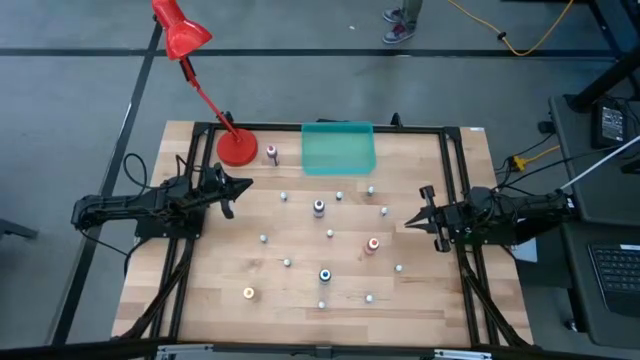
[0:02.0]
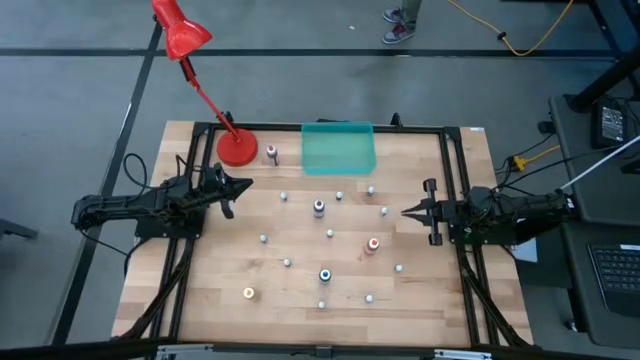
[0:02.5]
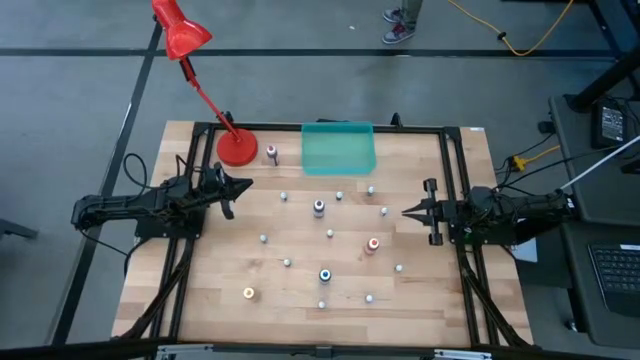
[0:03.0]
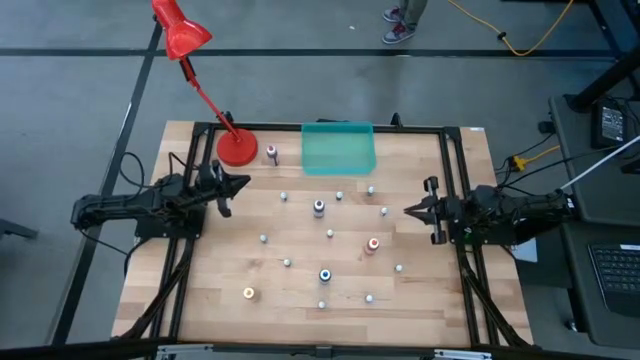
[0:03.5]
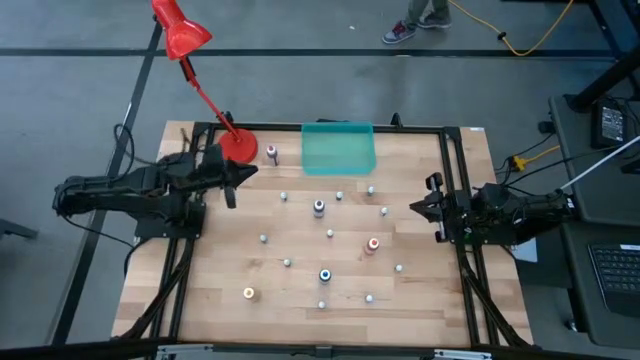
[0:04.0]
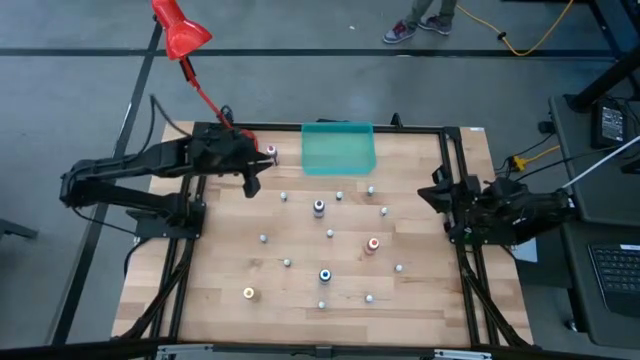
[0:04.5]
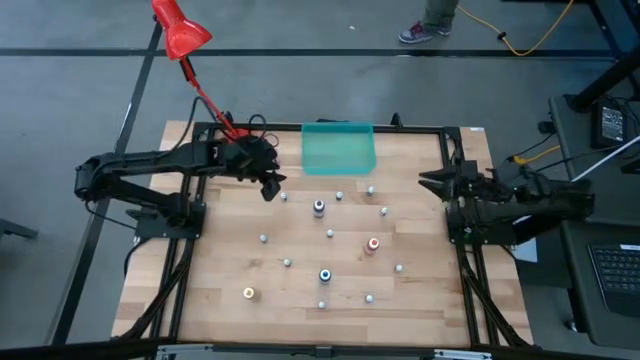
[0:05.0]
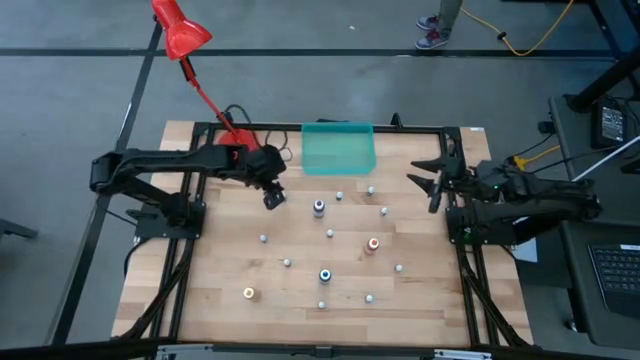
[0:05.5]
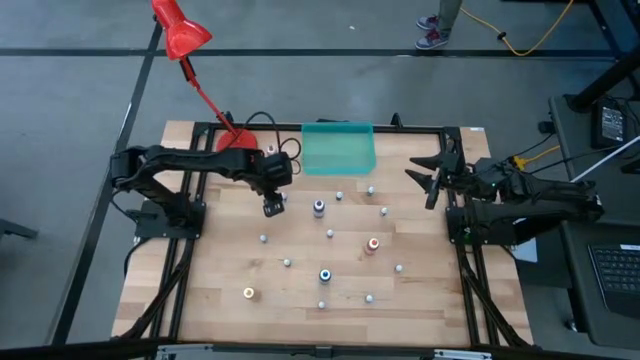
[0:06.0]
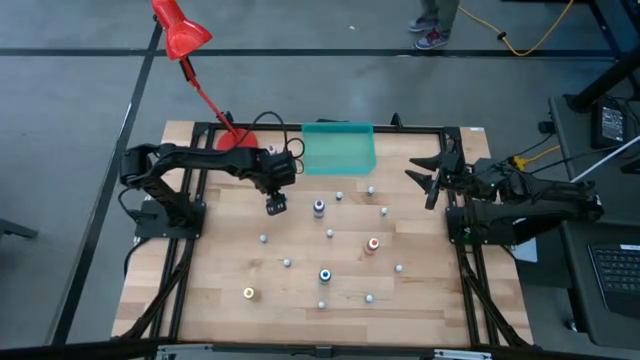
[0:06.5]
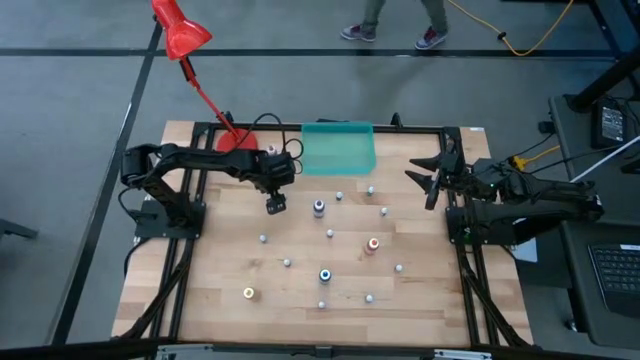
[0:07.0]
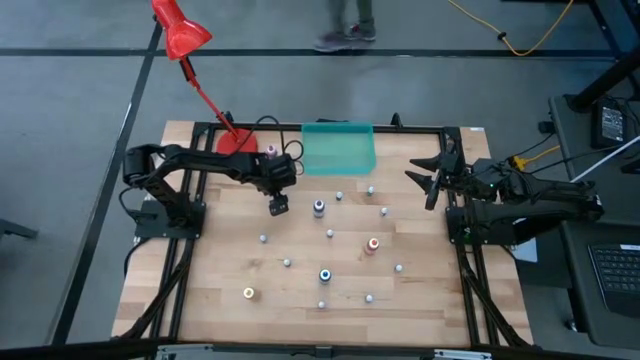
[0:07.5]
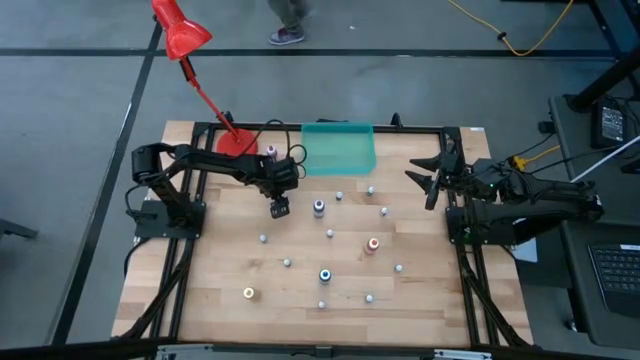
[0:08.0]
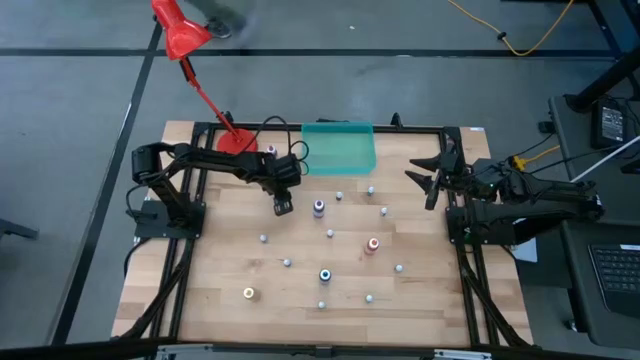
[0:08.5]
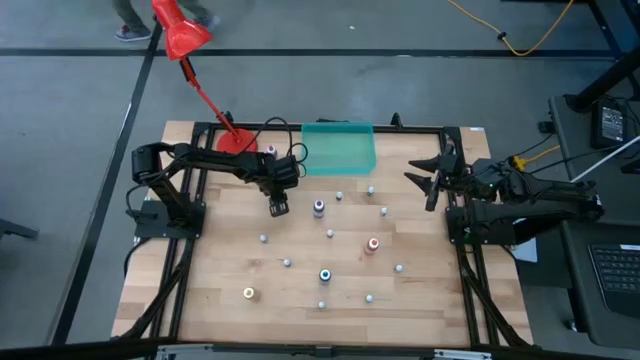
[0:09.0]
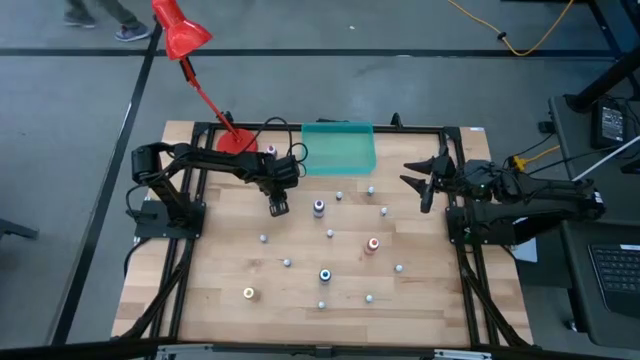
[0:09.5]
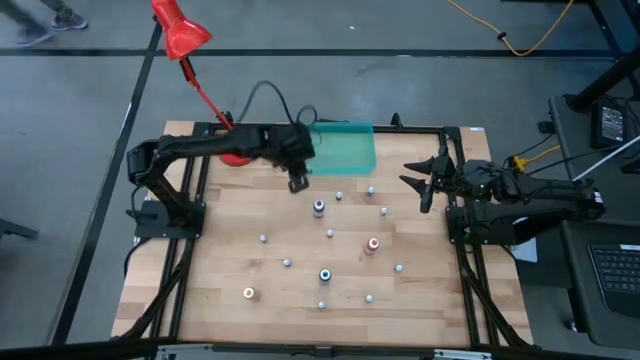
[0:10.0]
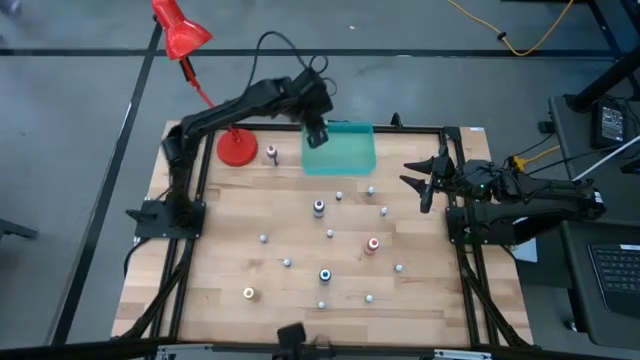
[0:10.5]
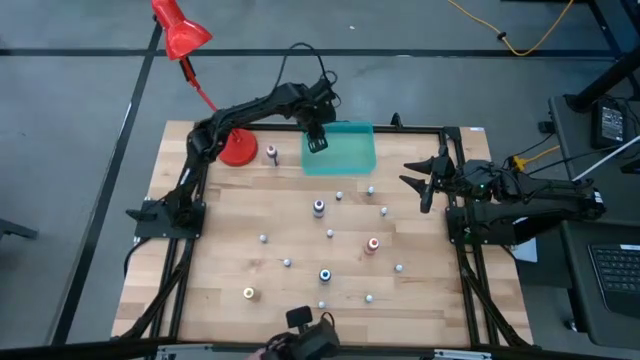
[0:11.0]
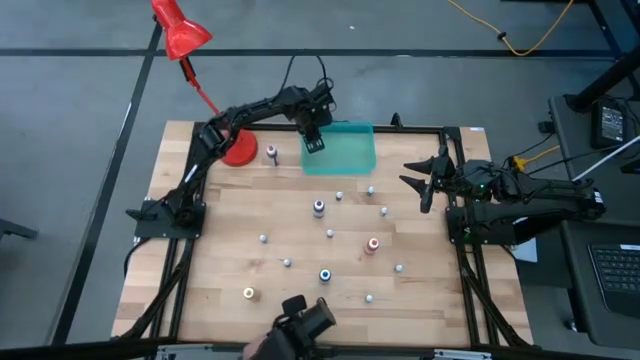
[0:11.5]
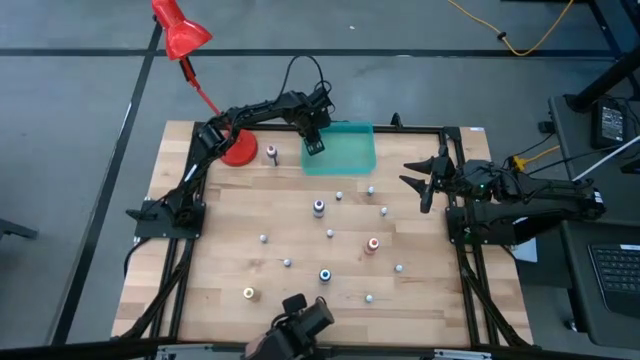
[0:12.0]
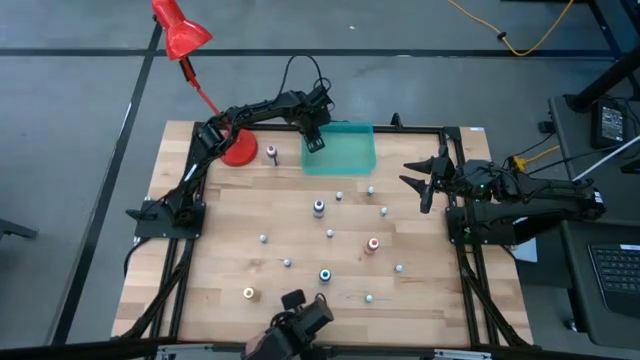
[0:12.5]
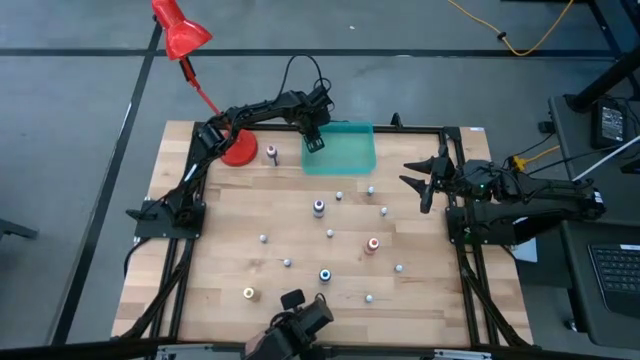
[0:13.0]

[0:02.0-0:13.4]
Task: Pick & Place food coloring
Put the top small black food coloring bottle into the green bin

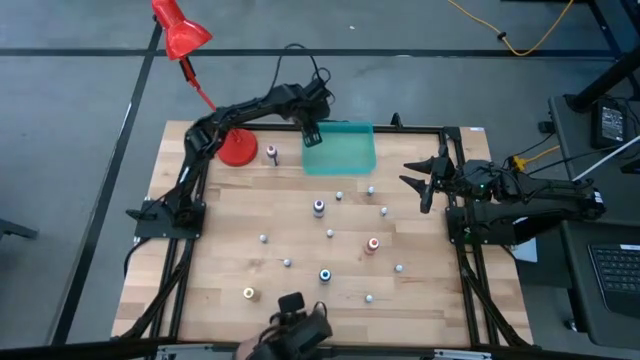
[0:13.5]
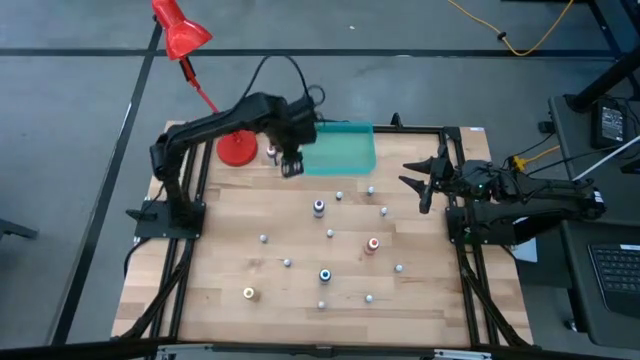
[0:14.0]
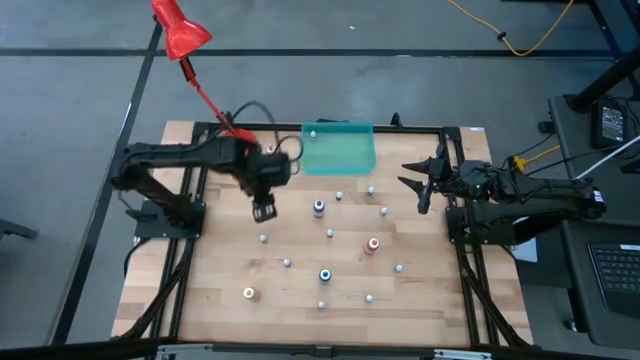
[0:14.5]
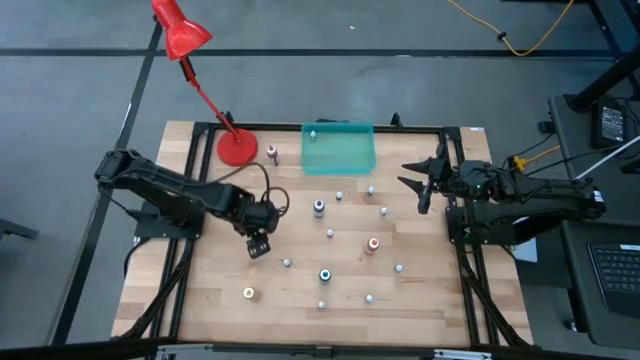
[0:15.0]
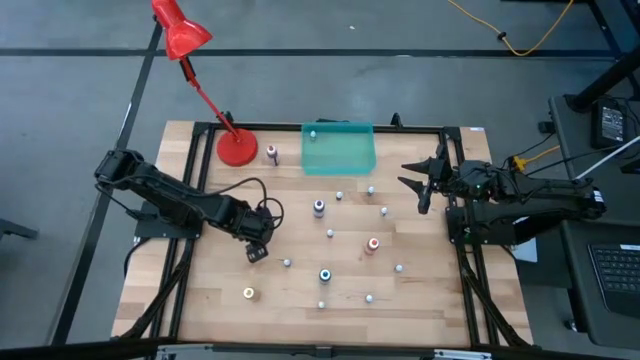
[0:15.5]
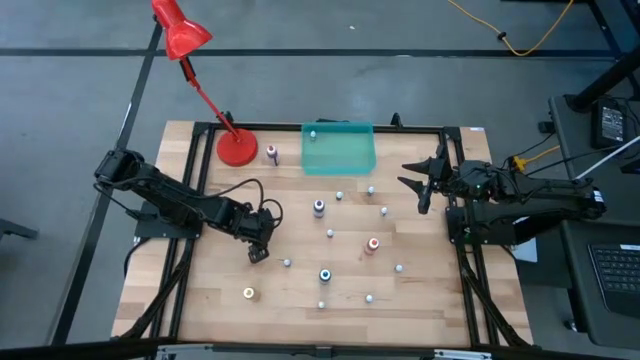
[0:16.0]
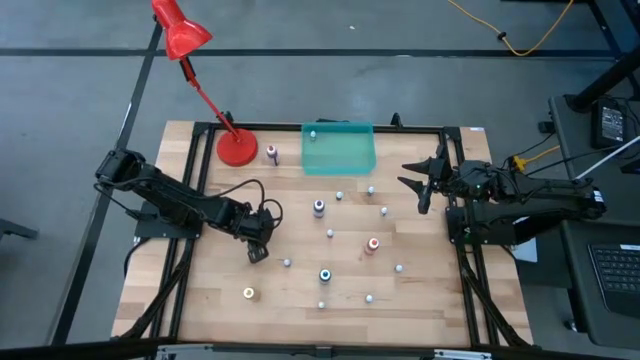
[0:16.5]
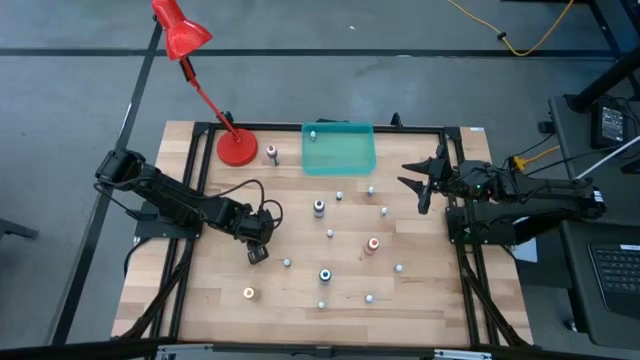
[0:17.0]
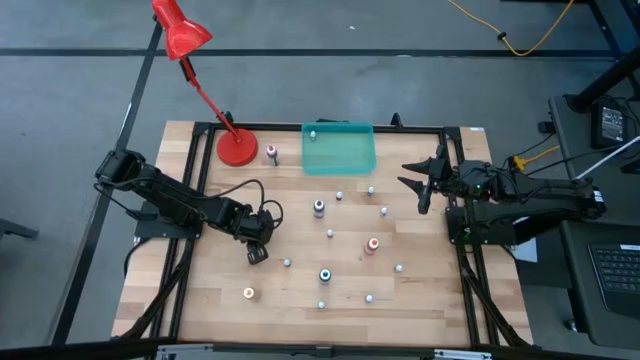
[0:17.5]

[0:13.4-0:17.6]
Put the bottom small blue food coloring bottle into the green bin

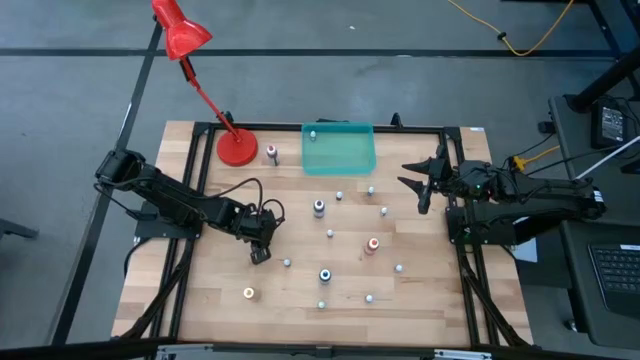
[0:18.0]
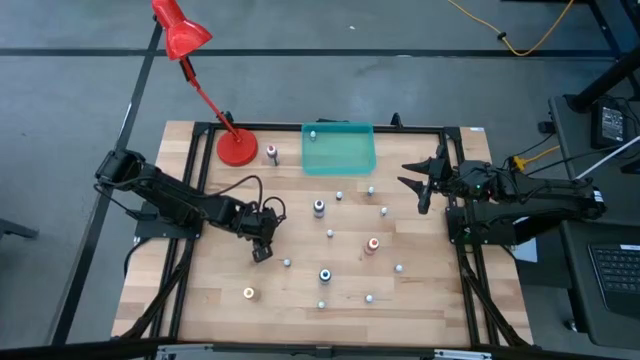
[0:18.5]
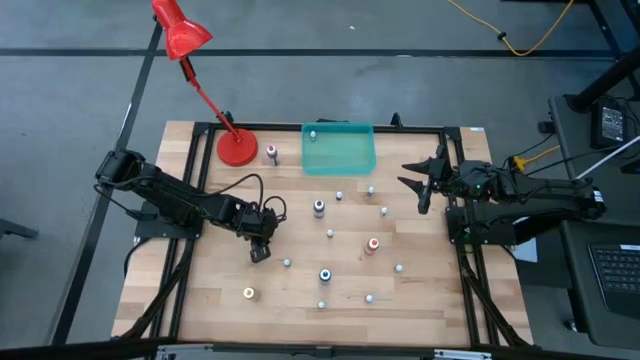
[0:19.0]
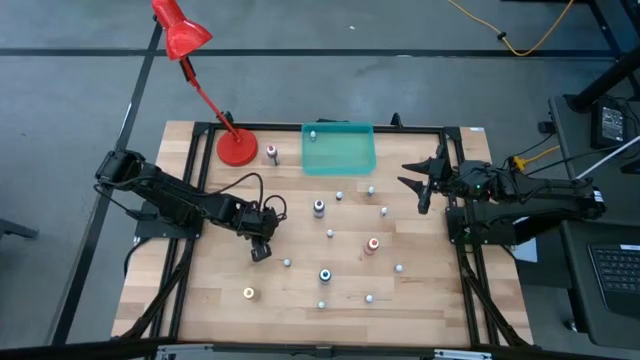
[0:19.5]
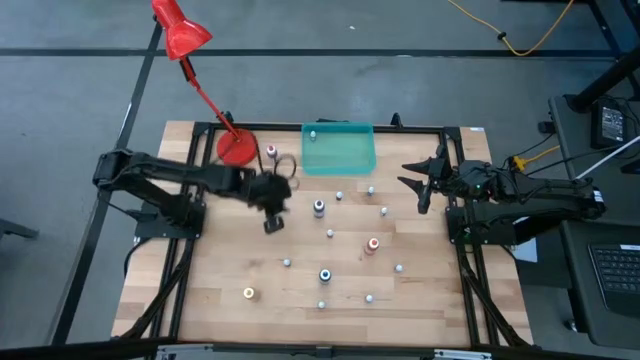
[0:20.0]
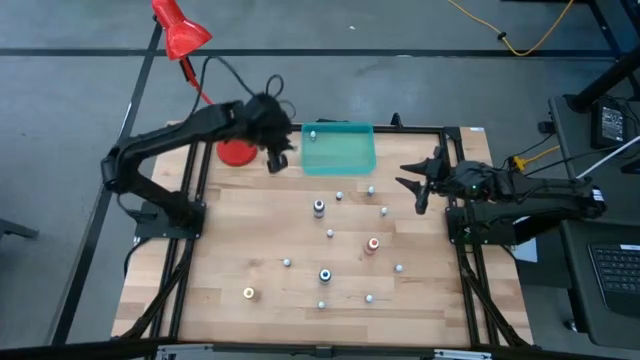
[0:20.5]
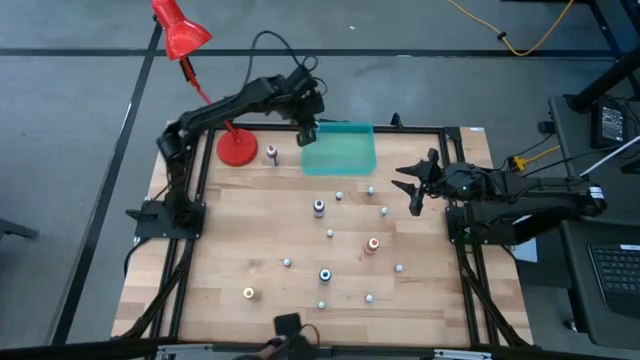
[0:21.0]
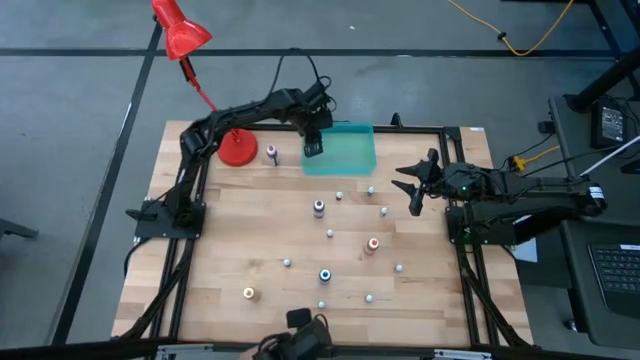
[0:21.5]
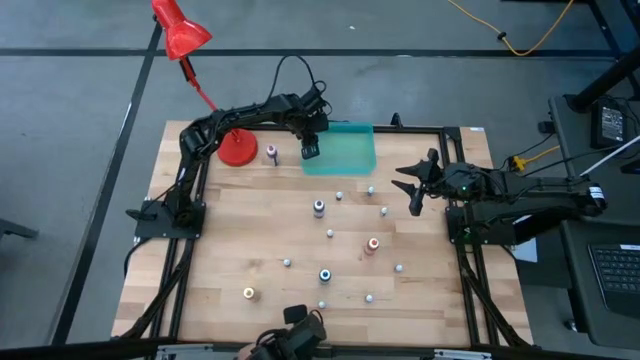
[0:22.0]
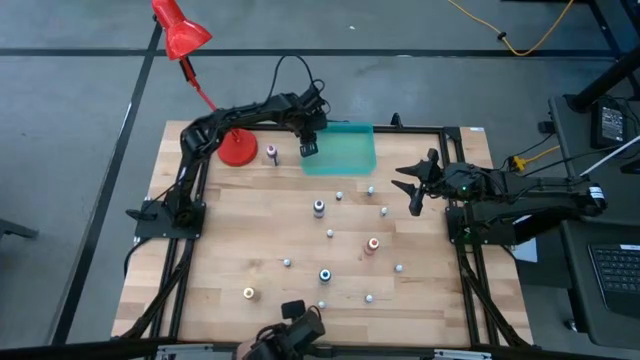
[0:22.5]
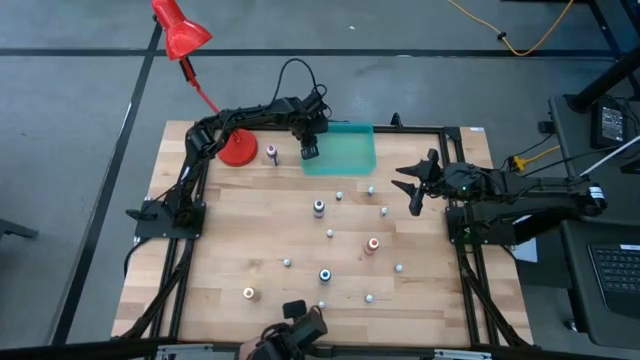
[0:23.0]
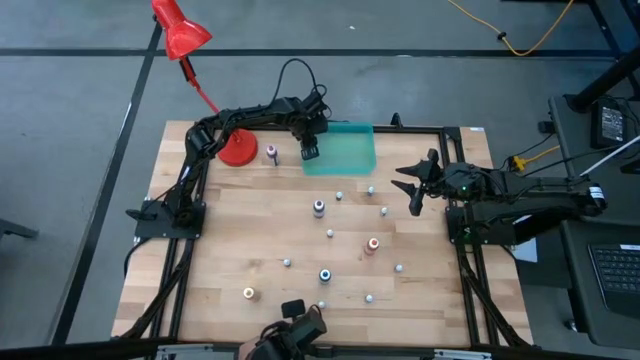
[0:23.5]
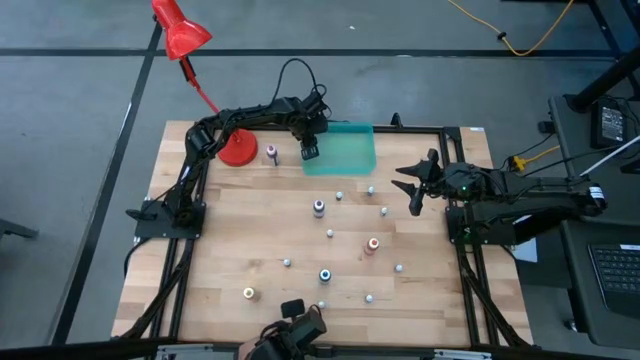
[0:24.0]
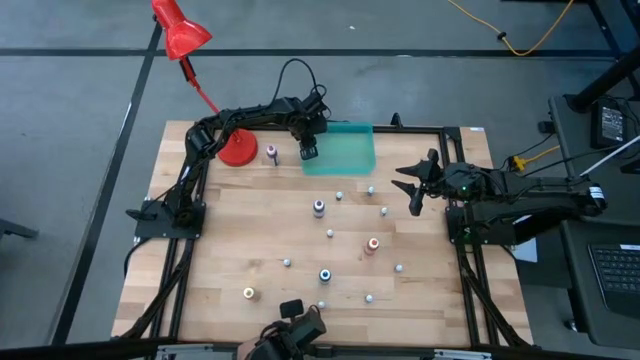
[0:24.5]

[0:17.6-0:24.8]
Put the bottom small blue food coloring bottle into the green bin
